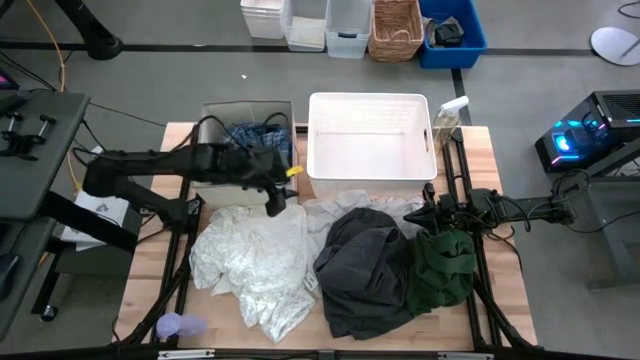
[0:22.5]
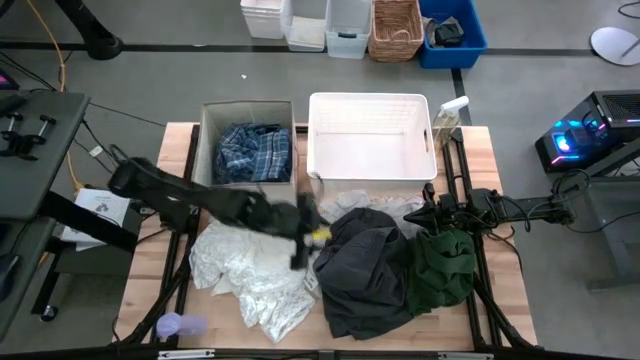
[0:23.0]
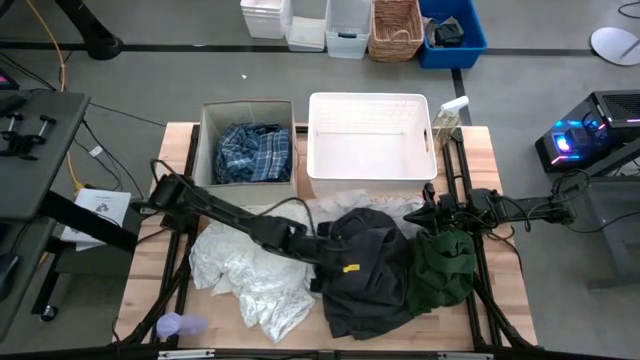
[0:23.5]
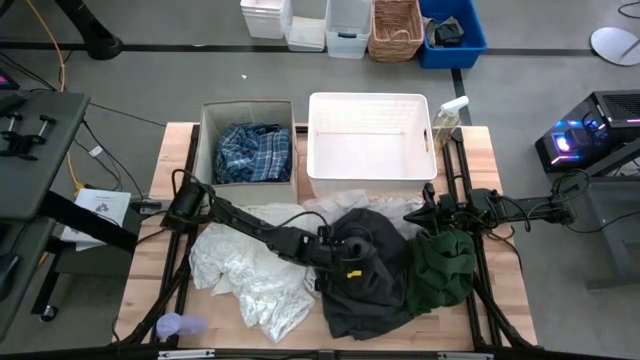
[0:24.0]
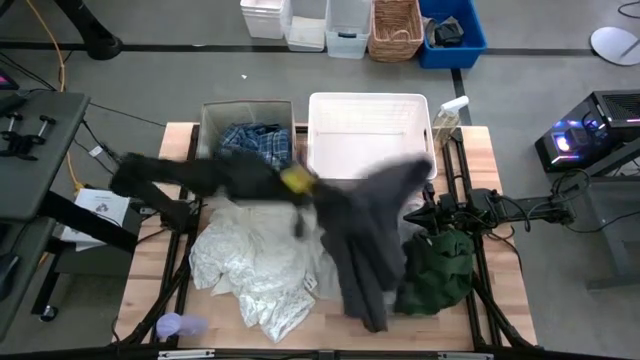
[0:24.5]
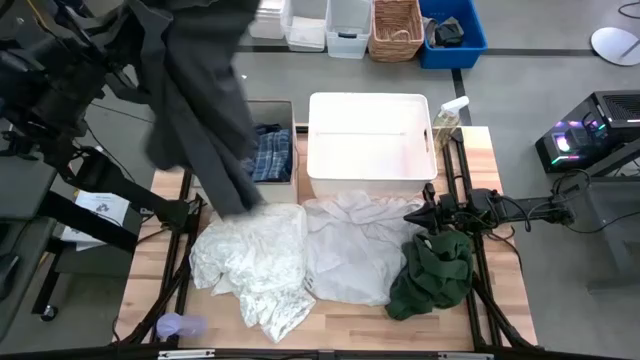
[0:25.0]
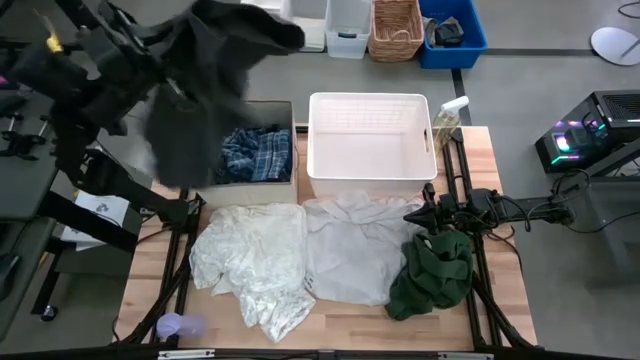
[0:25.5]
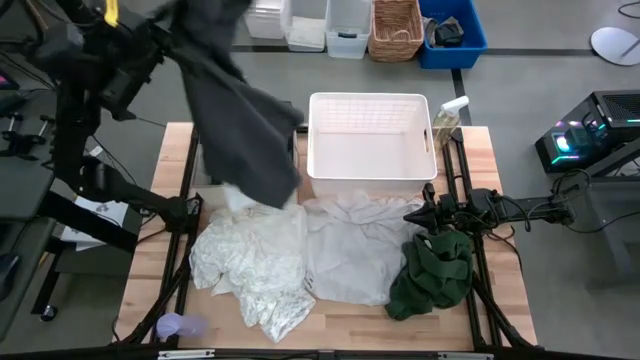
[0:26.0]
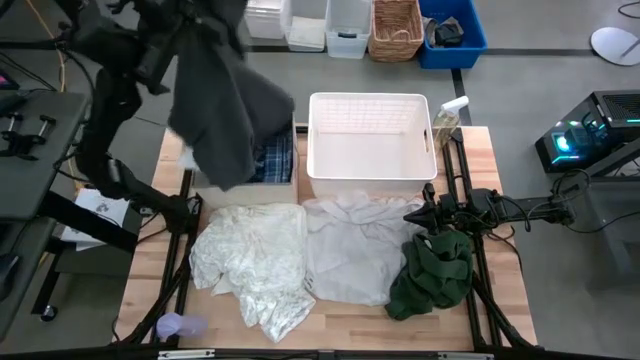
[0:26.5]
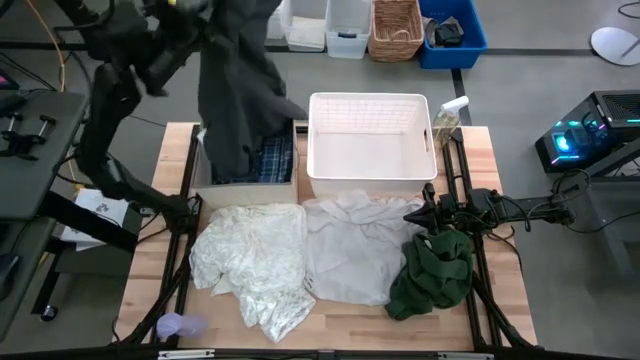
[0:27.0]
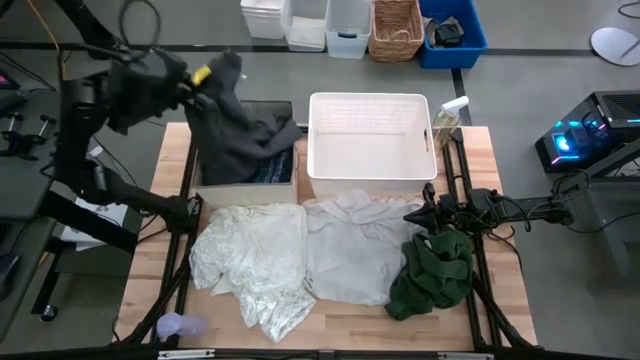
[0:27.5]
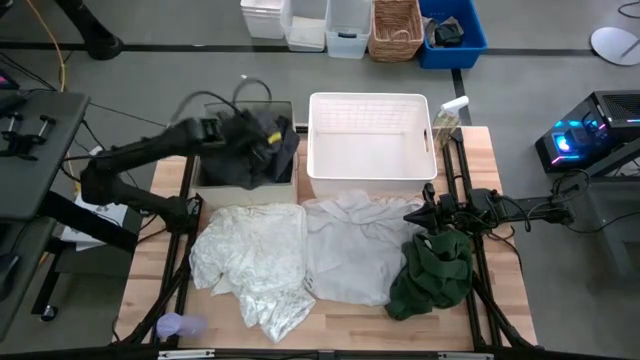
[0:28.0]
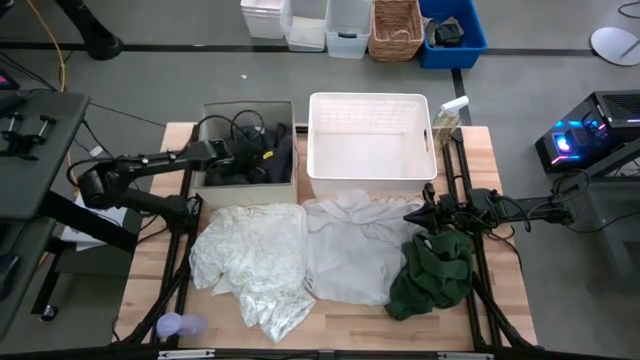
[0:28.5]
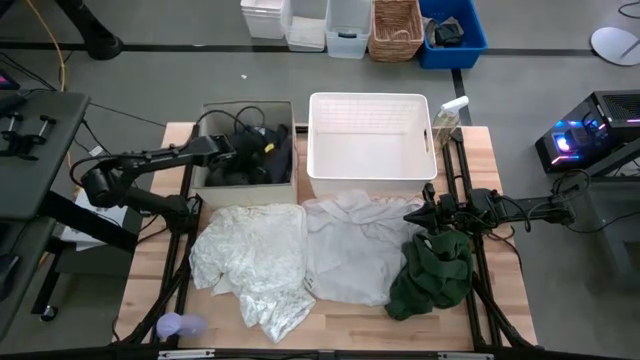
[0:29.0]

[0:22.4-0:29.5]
Task: Sort clothes
Put the black shorts on the laundry organizer

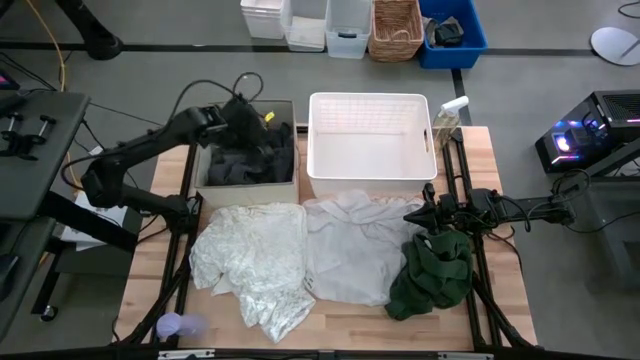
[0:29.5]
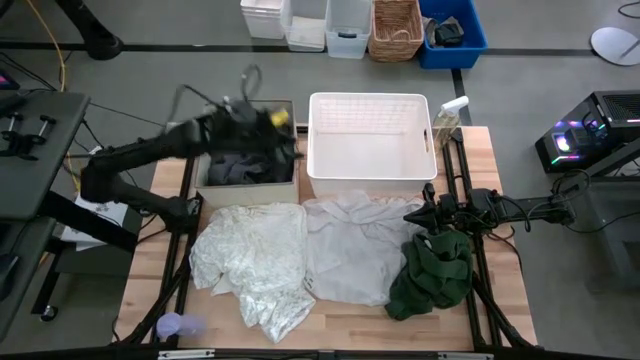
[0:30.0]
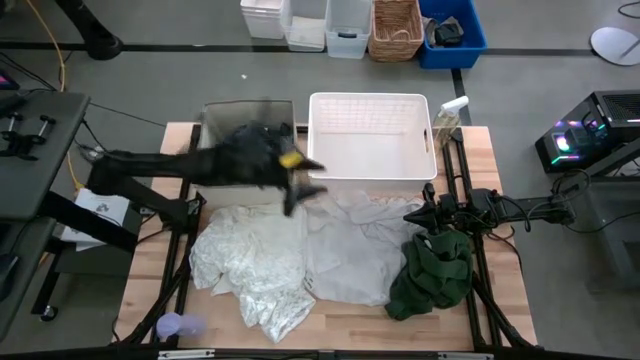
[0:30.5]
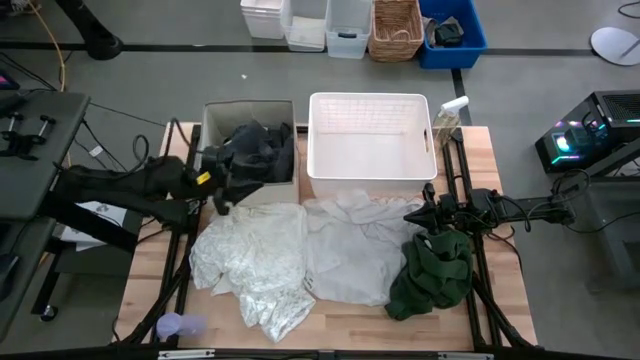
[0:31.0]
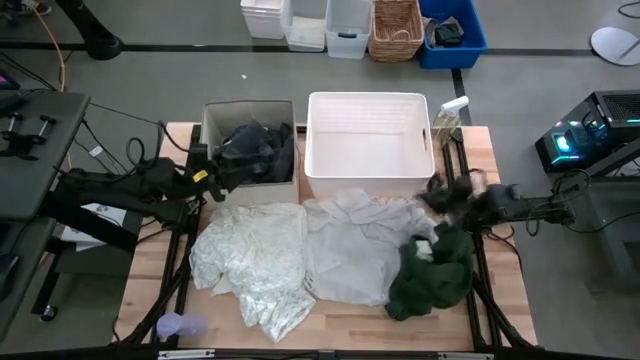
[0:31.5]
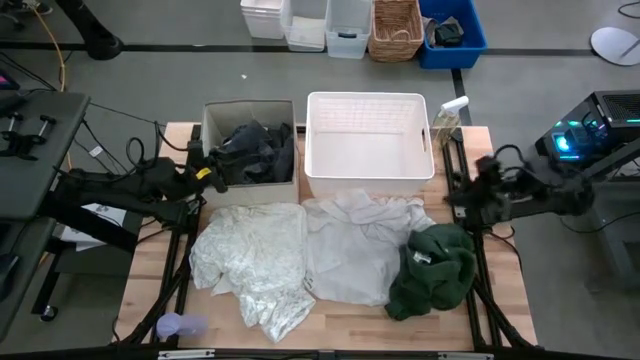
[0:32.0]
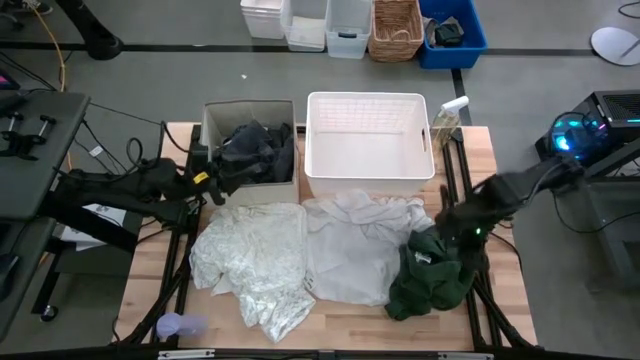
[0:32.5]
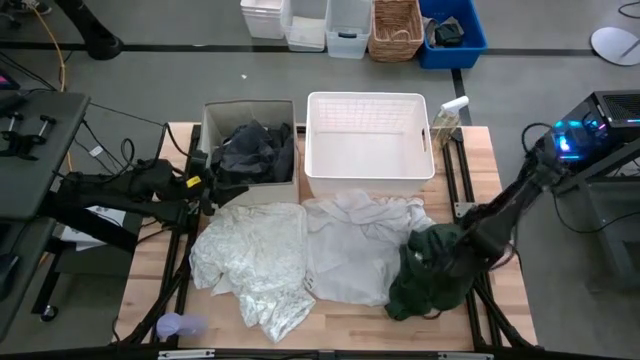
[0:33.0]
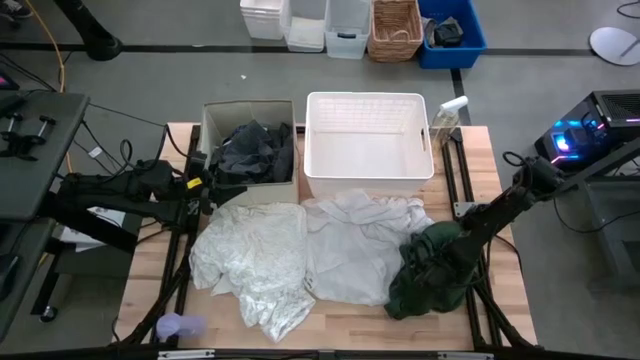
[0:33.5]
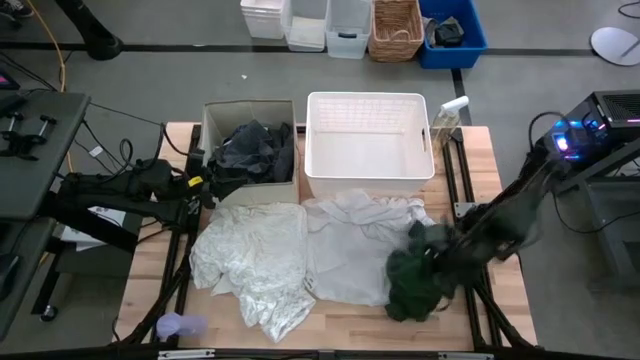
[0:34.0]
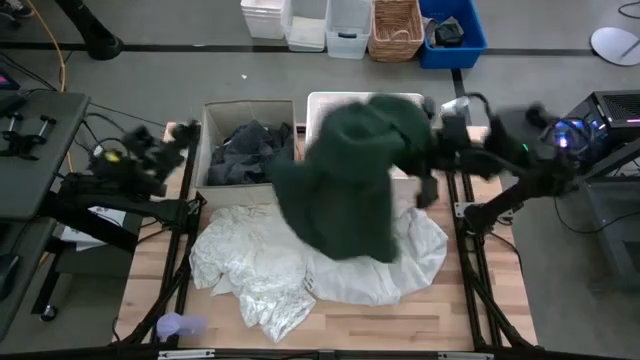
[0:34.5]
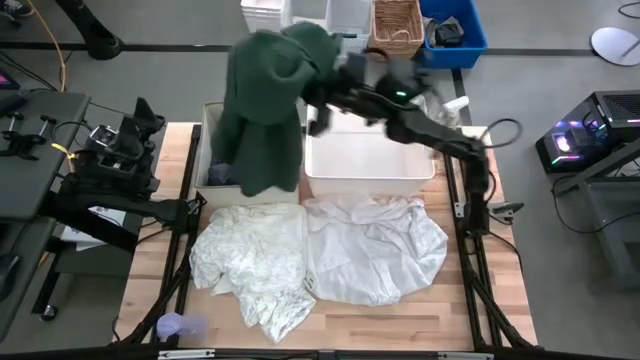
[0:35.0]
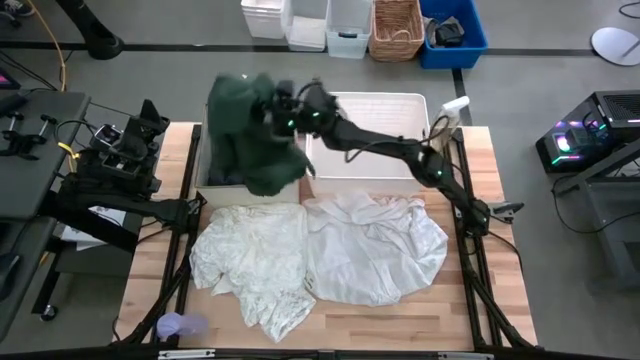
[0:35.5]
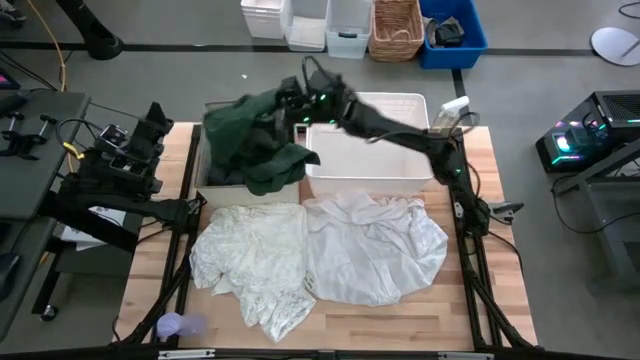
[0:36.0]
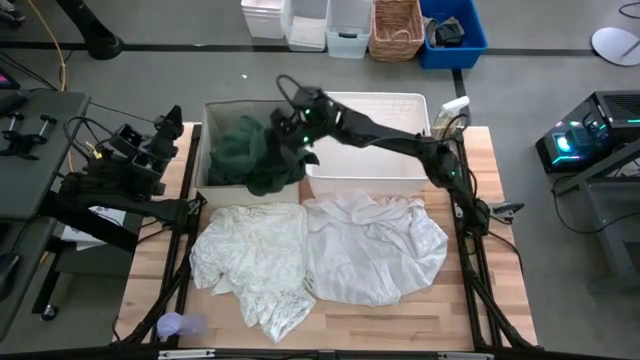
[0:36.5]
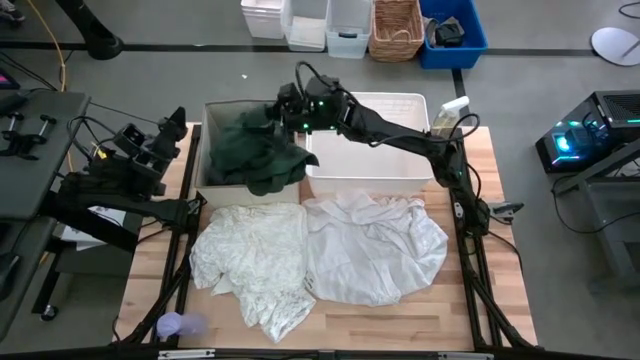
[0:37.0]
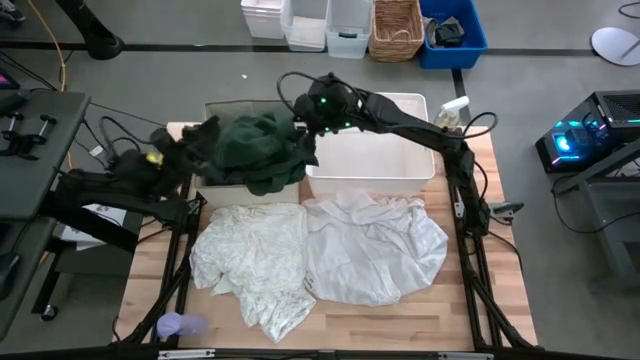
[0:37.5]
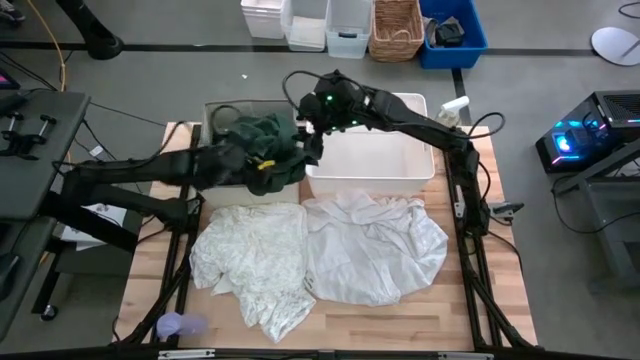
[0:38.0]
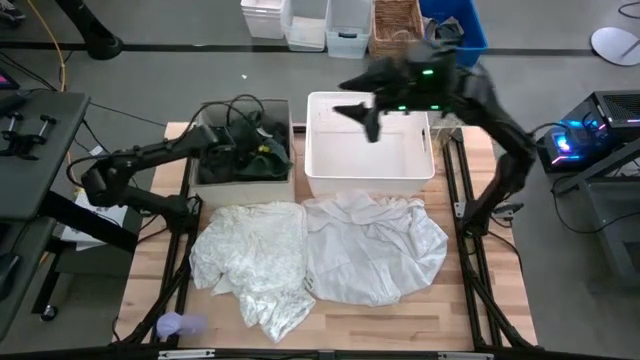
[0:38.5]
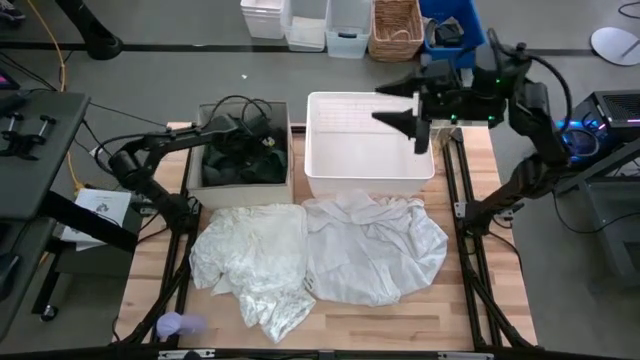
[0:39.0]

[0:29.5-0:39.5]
Put the green shirt on the laundry organizer

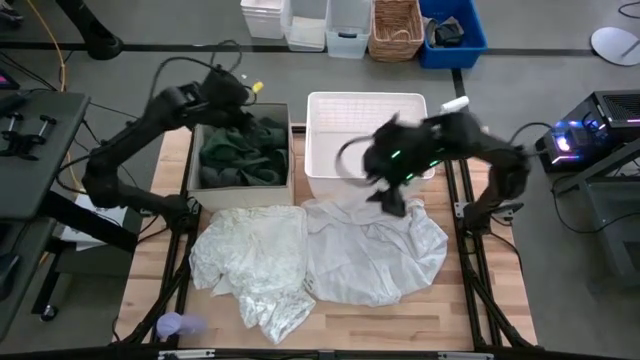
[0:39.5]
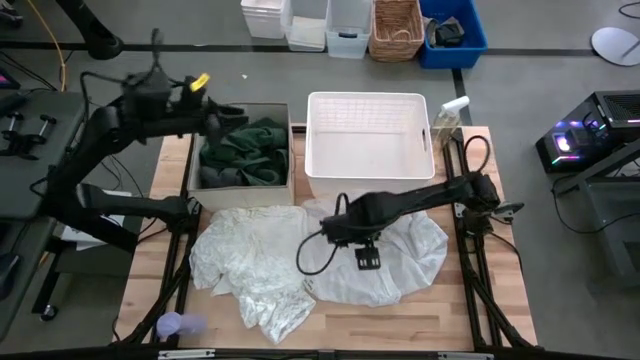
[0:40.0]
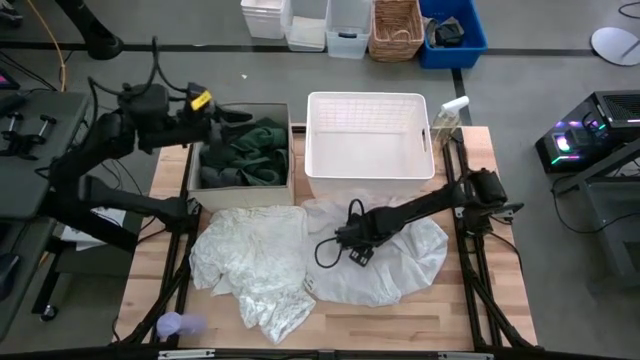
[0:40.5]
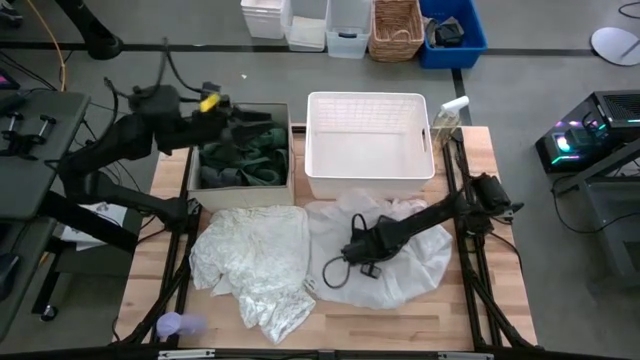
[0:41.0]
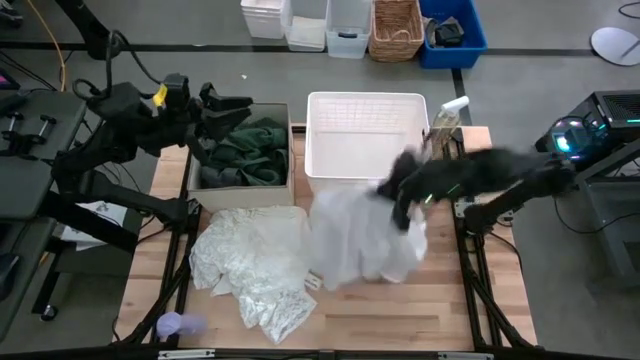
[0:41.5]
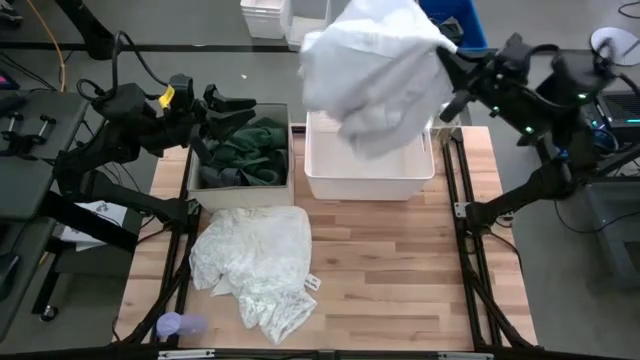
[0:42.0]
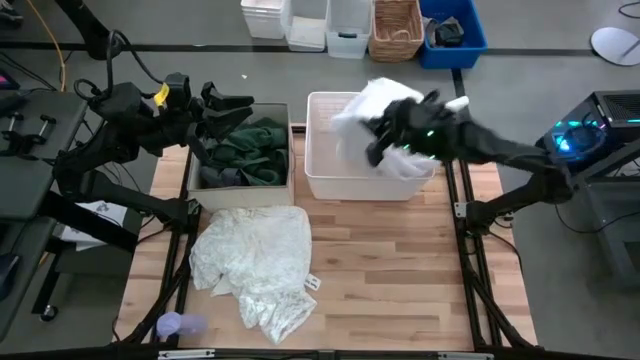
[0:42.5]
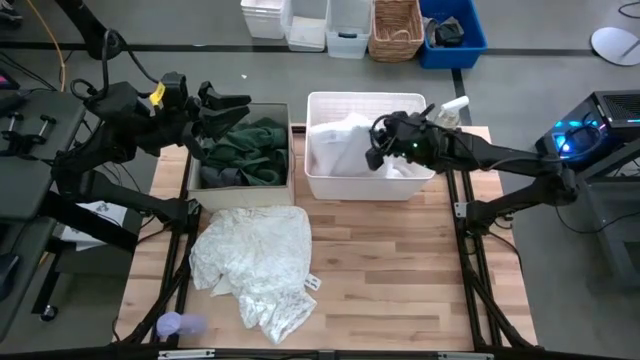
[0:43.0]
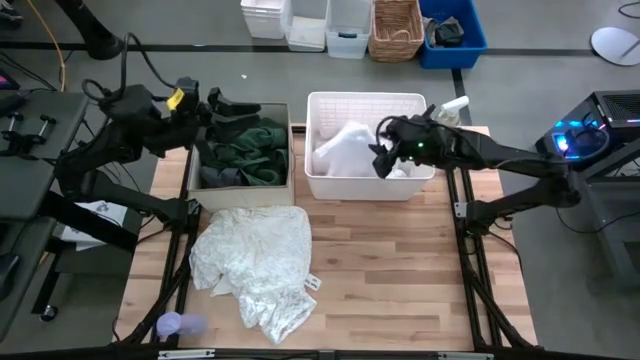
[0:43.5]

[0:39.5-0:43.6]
Put the white shirt on the white basket
